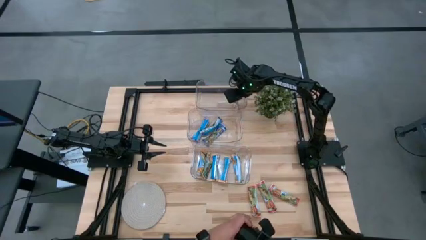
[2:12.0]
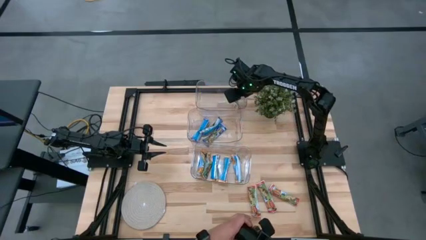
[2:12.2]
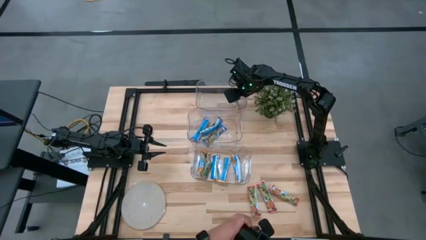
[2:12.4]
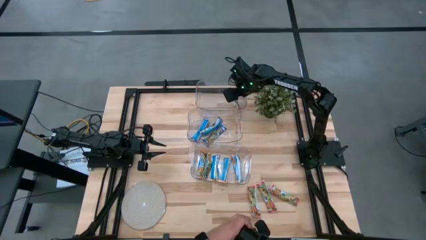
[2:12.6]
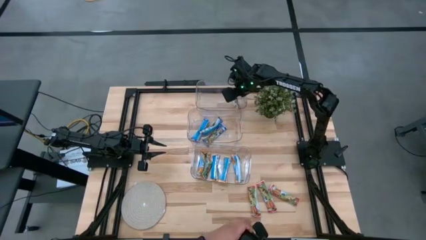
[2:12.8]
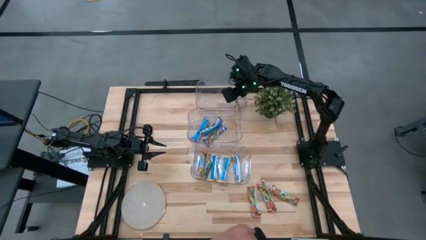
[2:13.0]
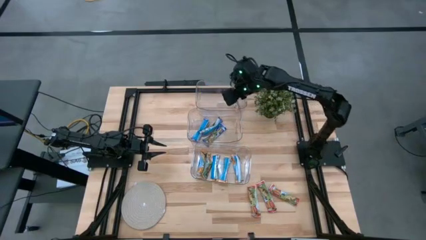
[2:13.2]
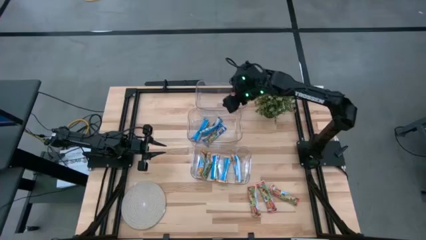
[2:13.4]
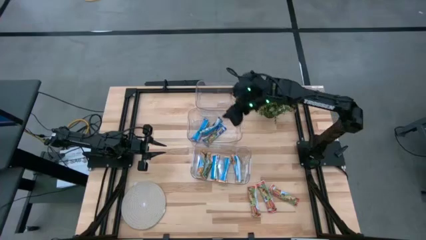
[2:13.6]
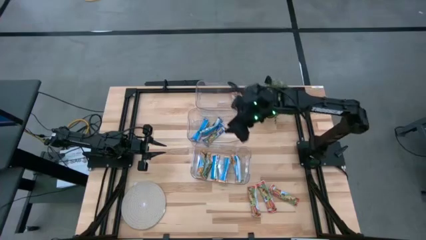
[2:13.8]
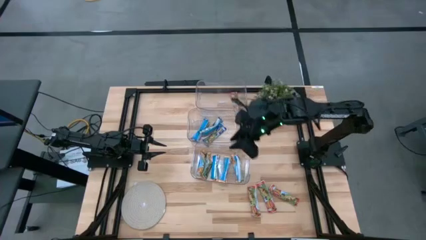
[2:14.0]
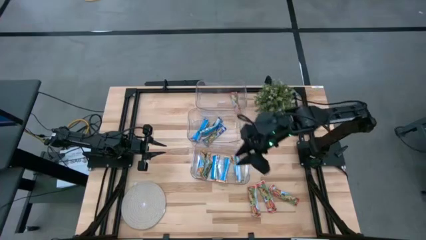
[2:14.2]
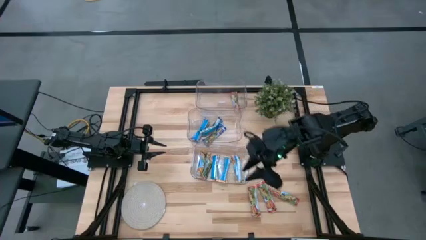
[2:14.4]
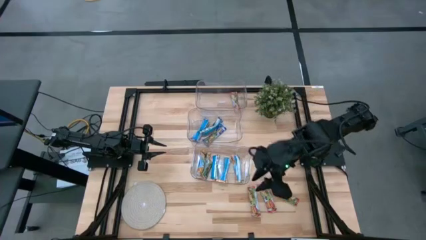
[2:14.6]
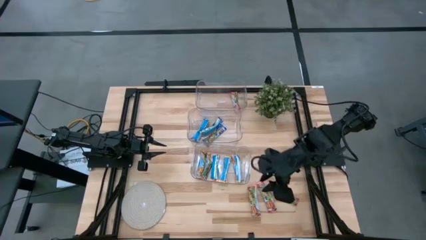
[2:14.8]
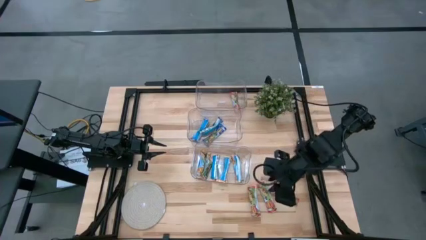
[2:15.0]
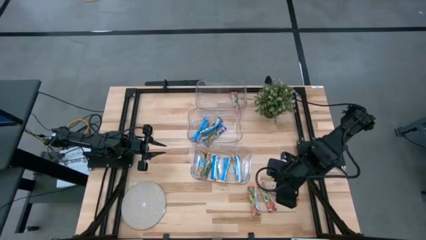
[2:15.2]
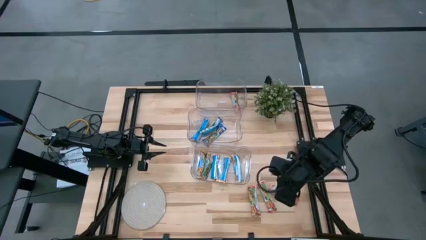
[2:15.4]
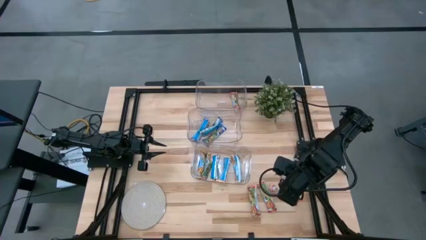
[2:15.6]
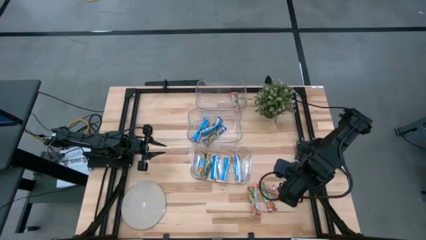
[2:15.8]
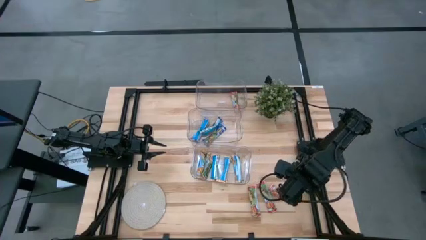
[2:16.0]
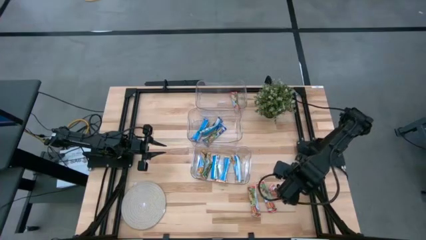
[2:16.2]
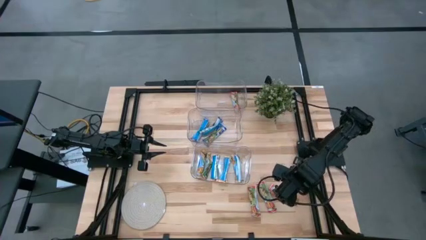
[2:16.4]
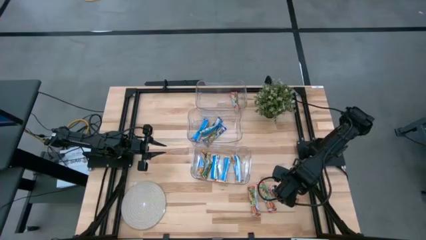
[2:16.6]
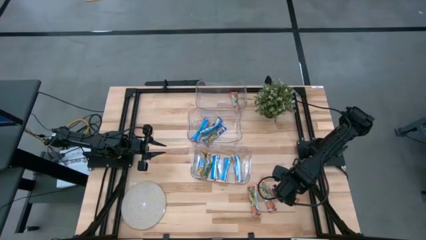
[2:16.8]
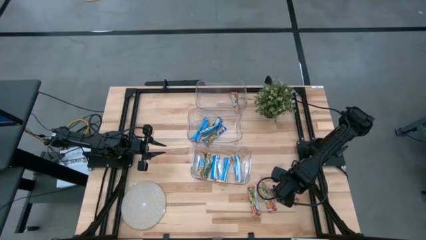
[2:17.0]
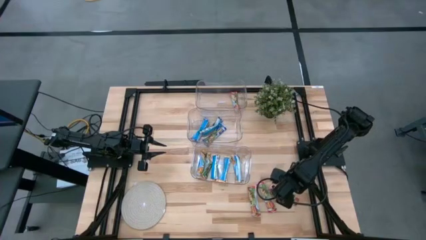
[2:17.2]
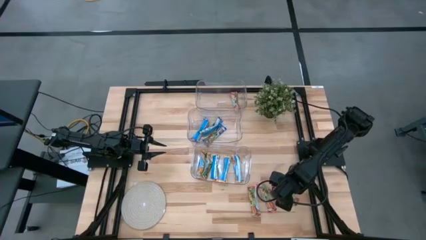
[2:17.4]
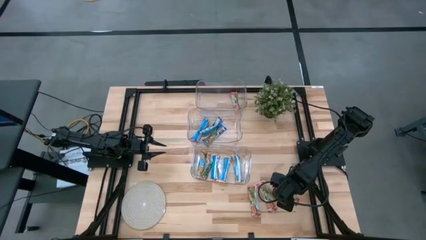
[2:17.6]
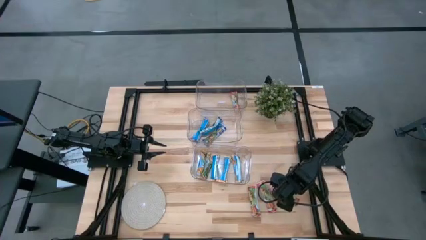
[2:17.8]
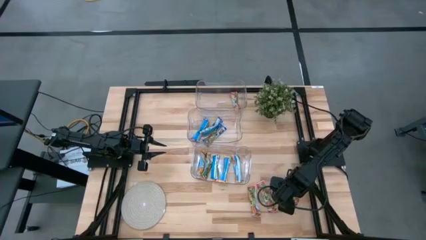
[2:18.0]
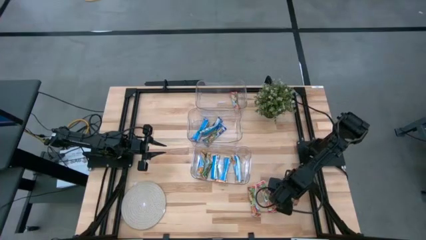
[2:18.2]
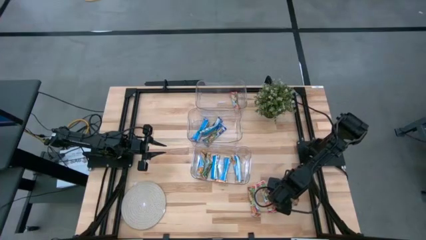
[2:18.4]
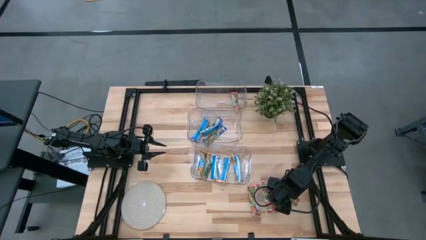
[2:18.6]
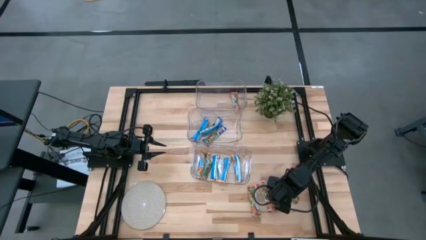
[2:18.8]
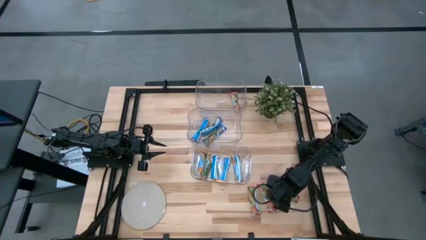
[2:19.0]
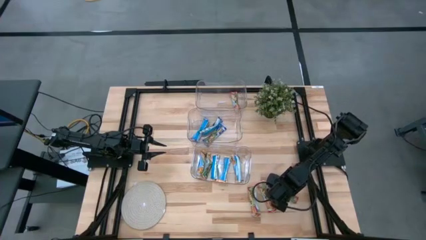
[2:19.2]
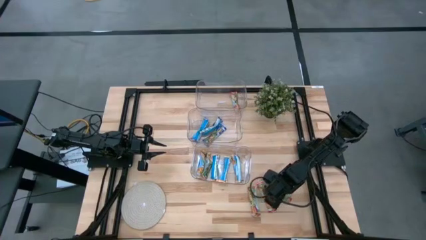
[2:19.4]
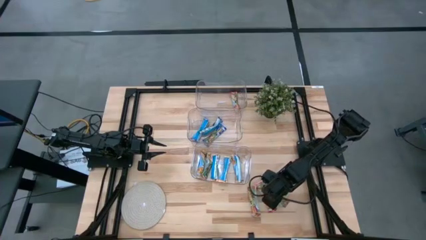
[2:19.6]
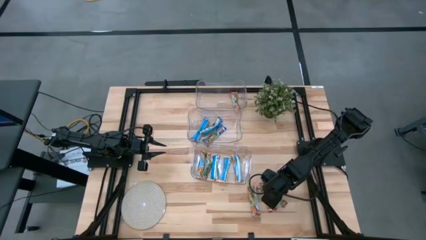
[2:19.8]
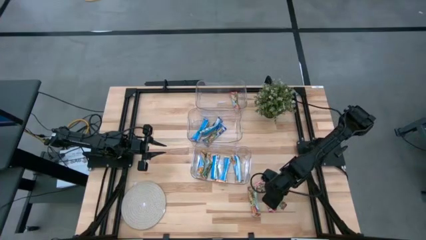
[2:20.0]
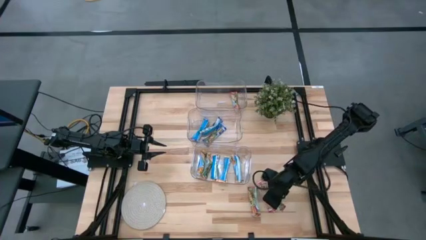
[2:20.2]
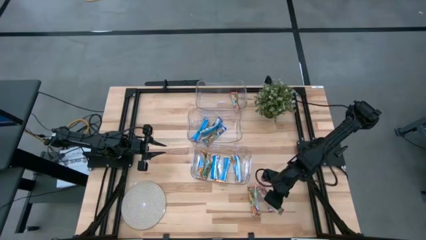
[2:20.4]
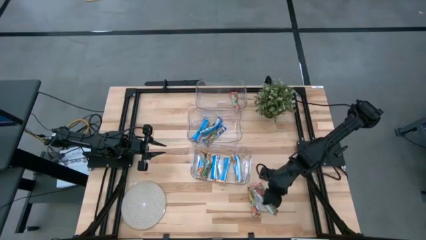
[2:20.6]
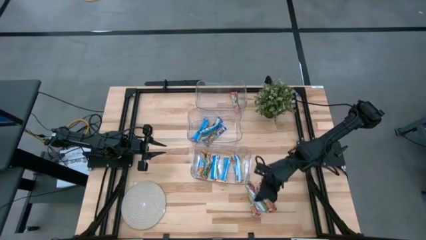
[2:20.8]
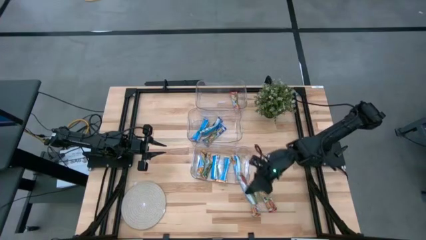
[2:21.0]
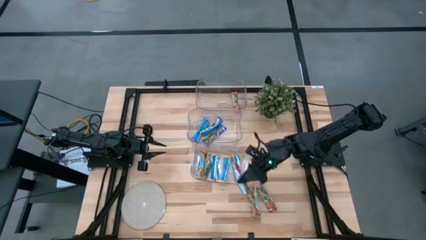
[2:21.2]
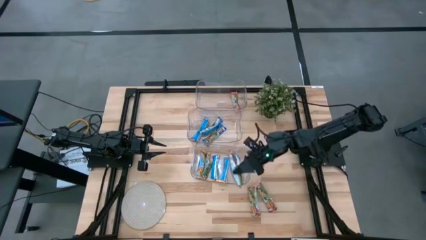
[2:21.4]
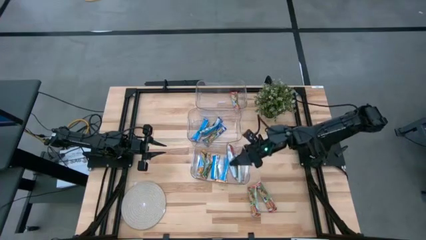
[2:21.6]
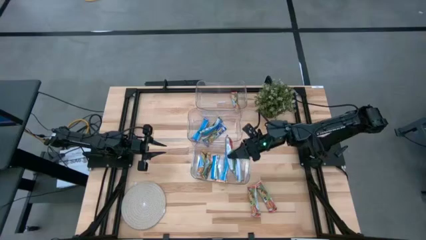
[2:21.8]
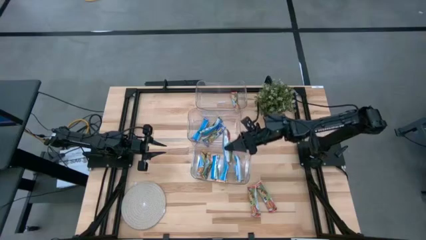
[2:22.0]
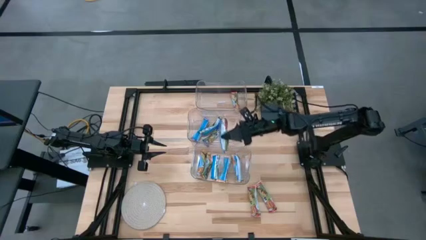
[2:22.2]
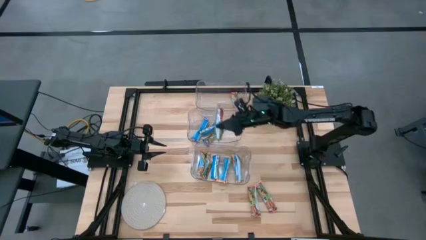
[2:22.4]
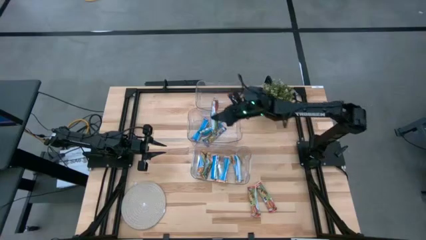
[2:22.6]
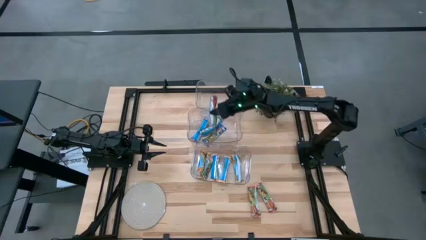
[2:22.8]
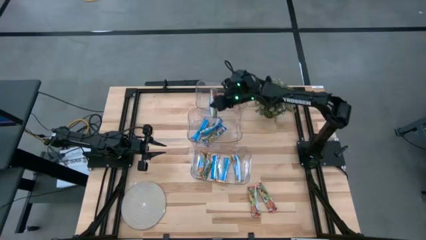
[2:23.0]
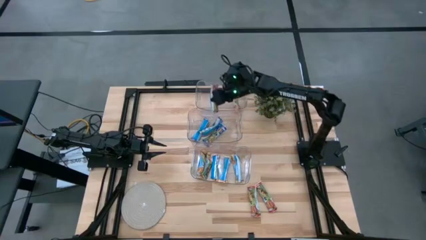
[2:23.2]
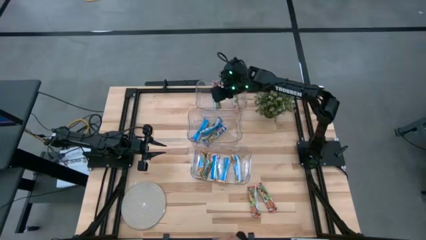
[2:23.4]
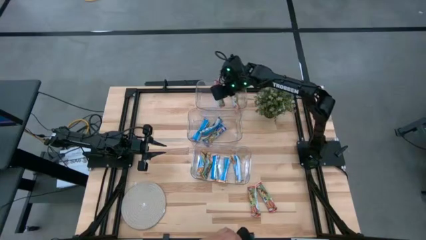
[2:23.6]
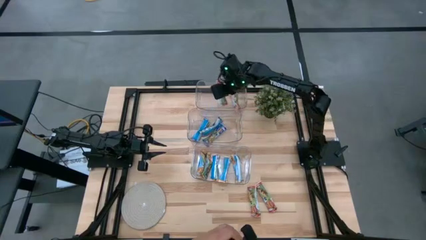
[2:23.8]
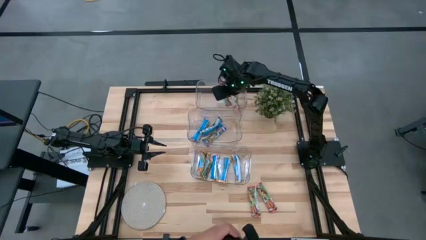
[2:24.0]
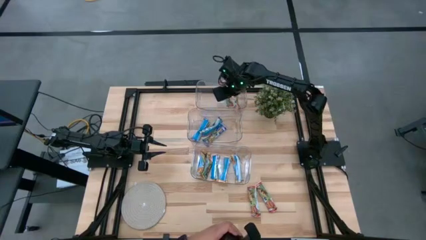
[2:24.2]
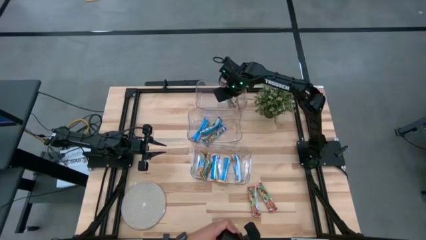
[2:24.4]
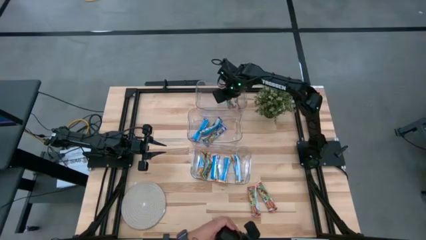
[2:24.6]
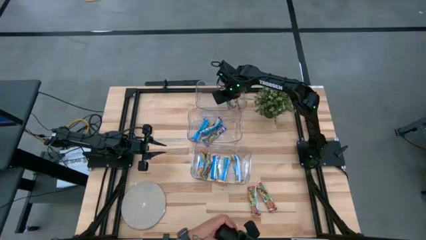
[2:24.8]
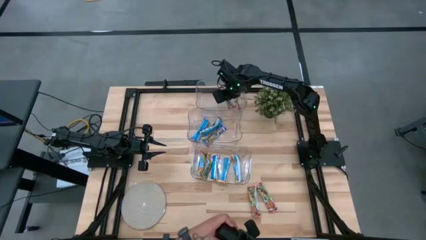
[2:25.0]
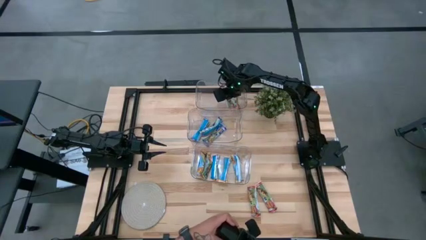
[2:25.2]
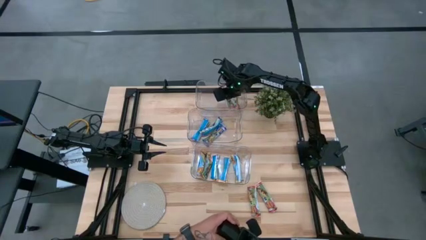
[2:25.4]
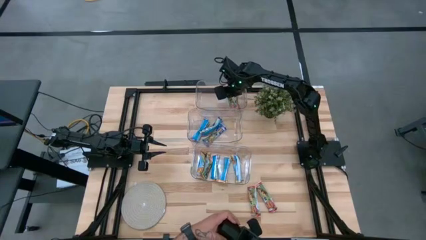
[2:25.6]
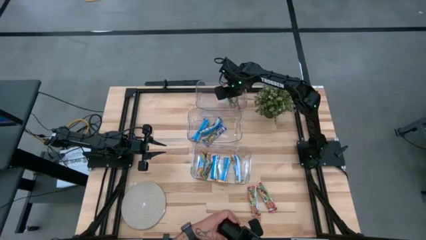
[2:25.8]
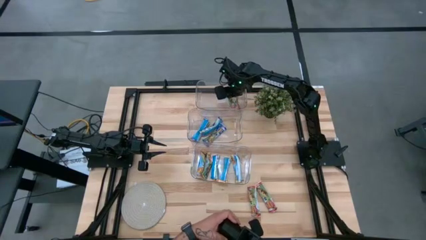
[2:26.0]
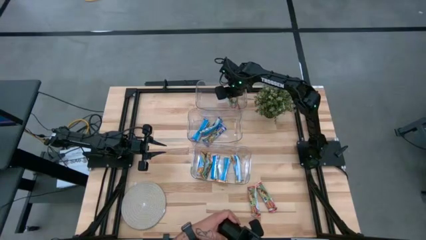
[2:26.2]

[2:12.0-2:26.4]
Task: Pick and place Granola Bars by type
Put the red granola bar into the top transparent bin

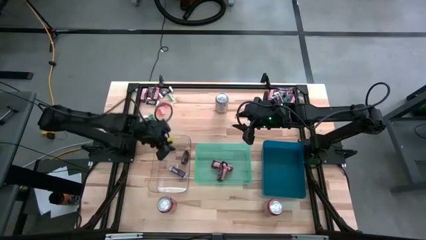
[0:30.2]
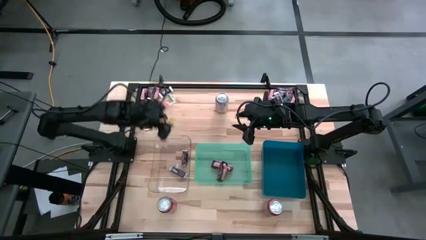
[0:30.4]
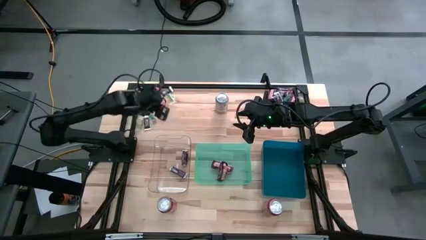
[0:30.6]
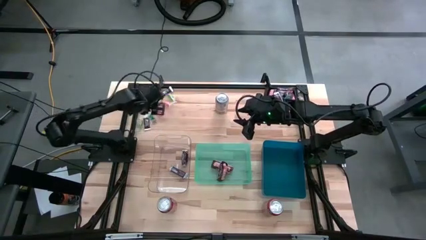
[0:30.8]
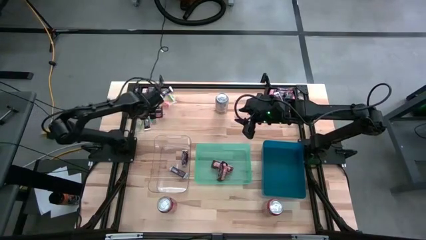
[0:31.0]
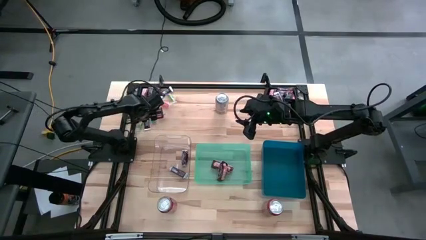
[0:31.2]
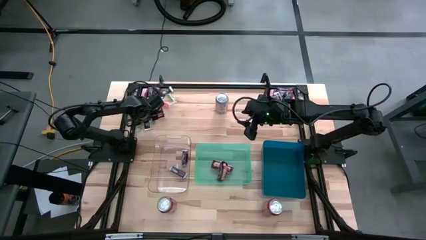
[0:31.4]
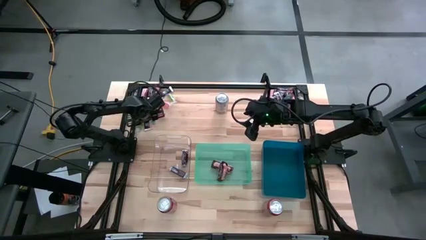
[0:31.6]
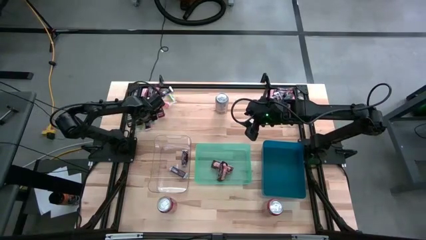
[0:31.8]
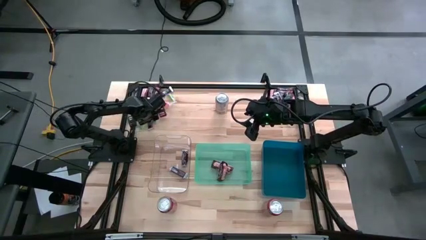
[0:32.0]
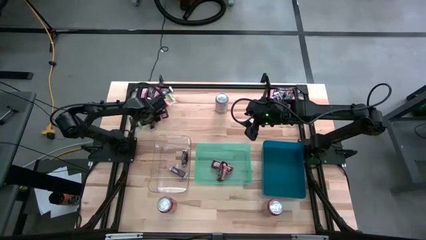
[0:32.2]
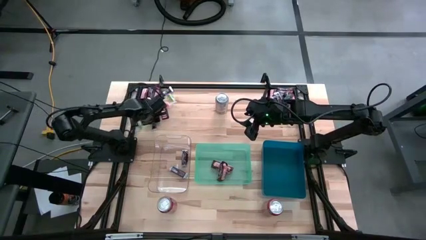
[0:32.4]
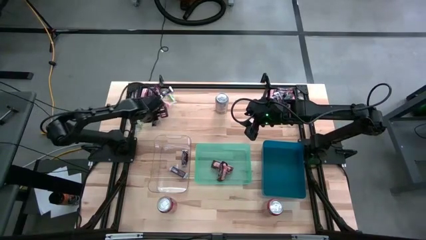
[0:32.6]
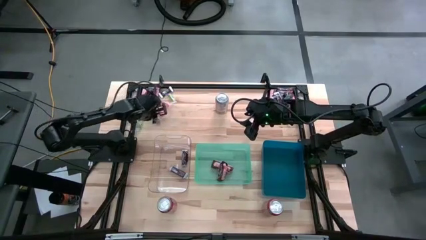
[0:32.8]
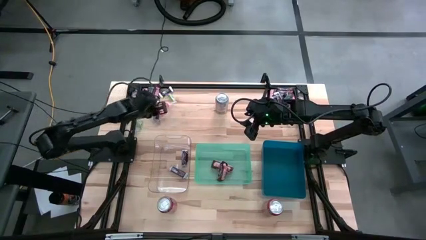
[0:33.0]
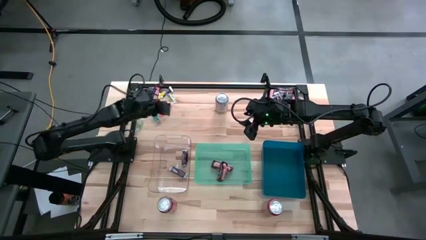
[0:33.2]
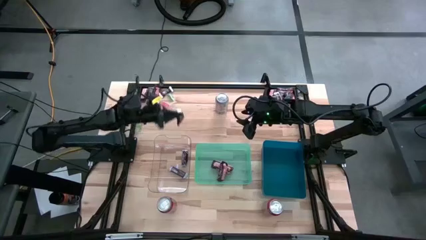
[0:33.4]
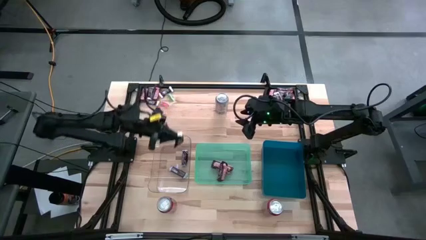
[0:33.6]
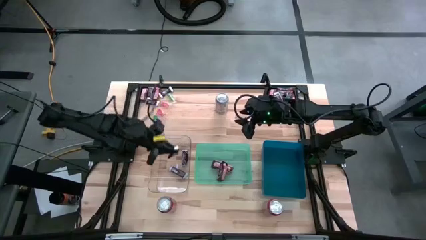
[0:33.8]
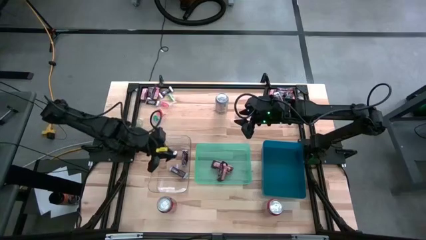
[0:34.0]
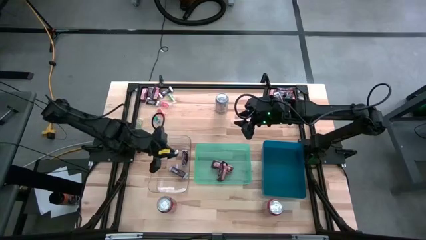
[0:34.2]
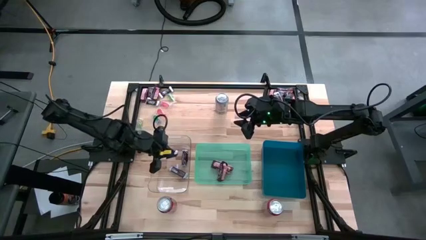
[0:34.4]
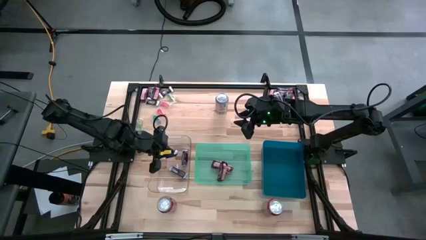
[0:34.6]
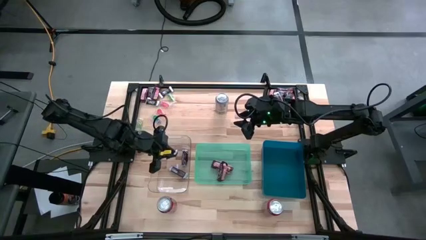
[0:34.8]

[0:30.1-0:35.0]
Task: Organize candy in baskets
Put the brown white chocolate bar into the transparent bin
